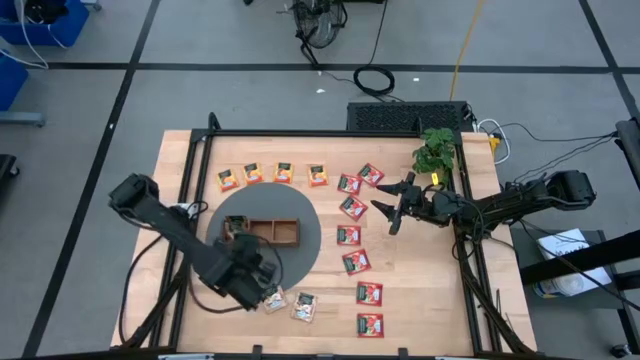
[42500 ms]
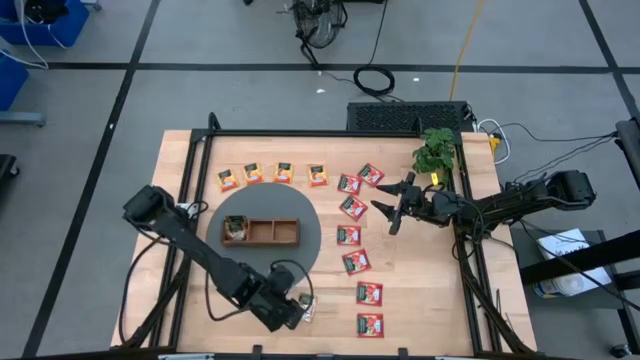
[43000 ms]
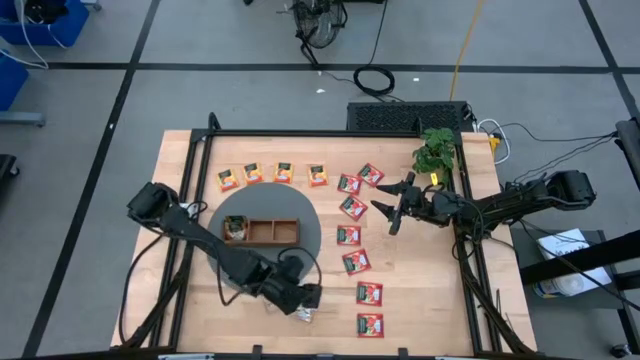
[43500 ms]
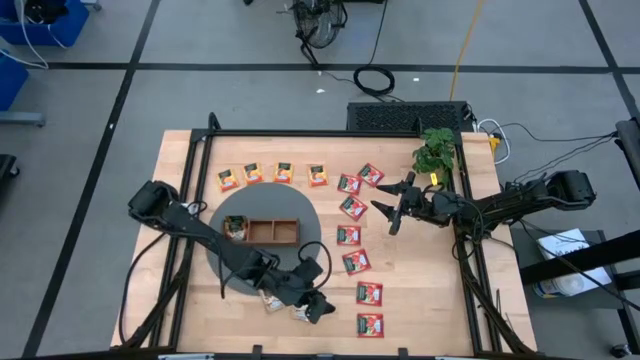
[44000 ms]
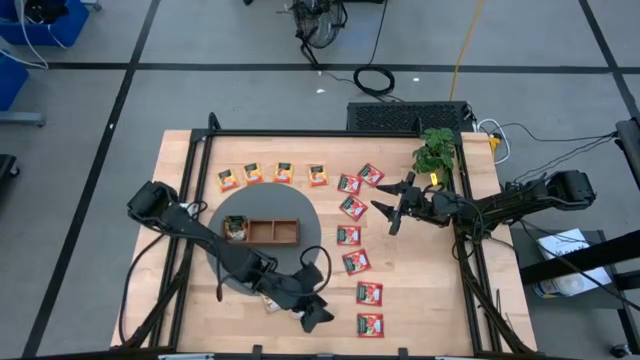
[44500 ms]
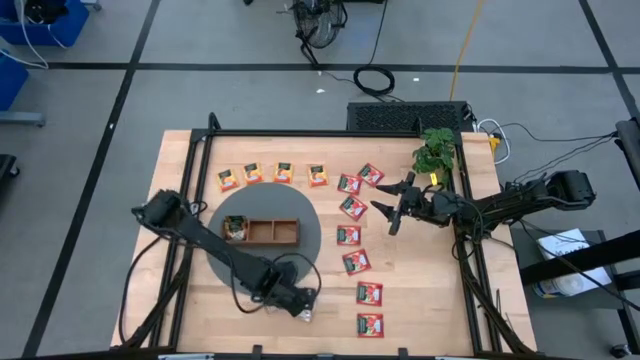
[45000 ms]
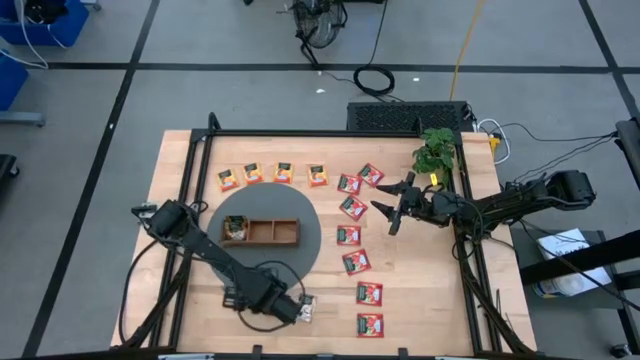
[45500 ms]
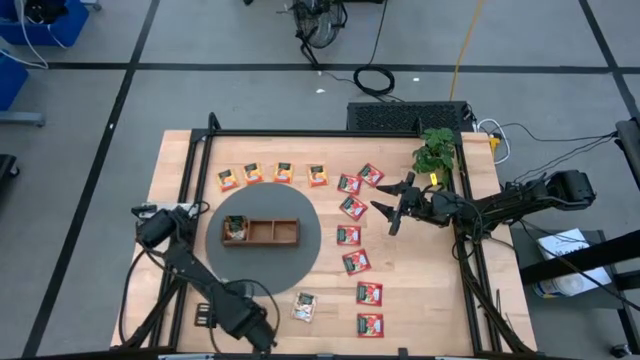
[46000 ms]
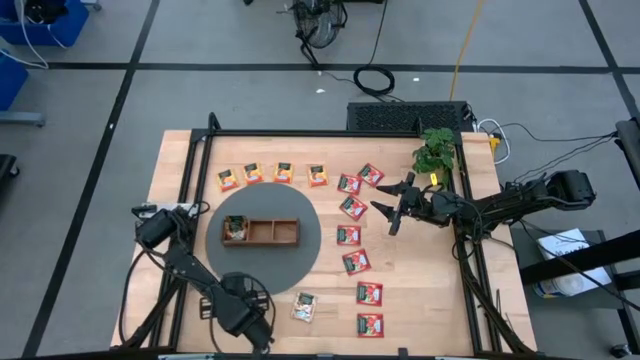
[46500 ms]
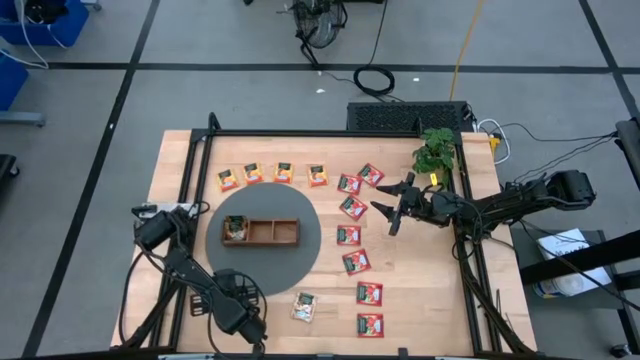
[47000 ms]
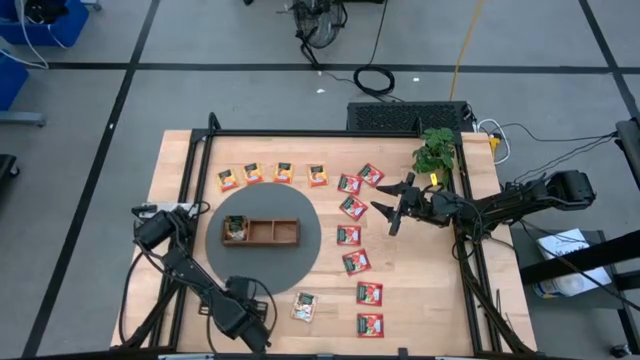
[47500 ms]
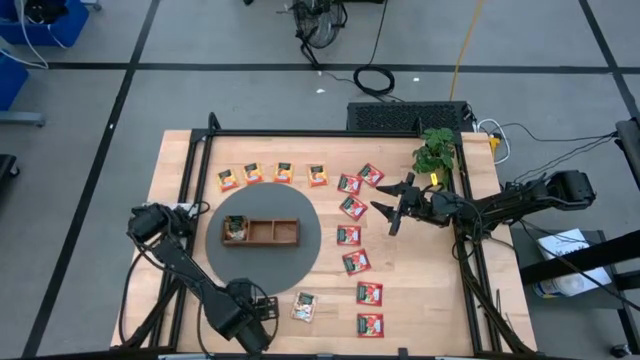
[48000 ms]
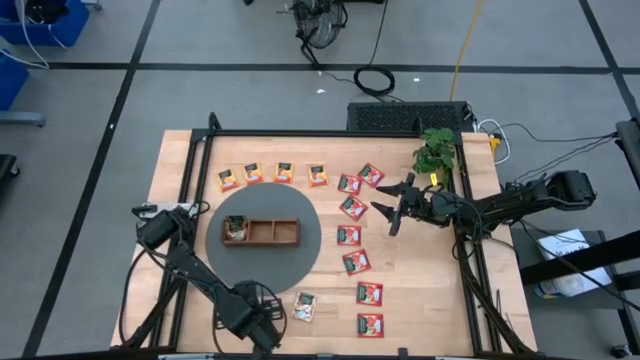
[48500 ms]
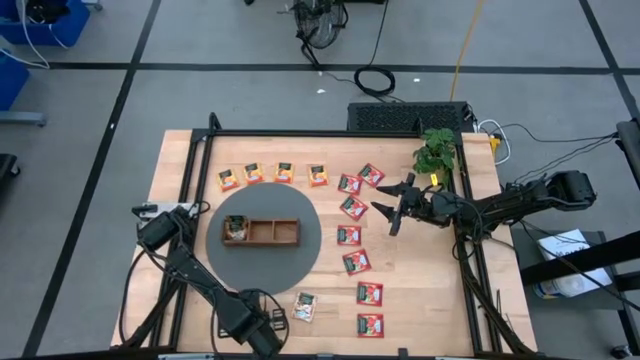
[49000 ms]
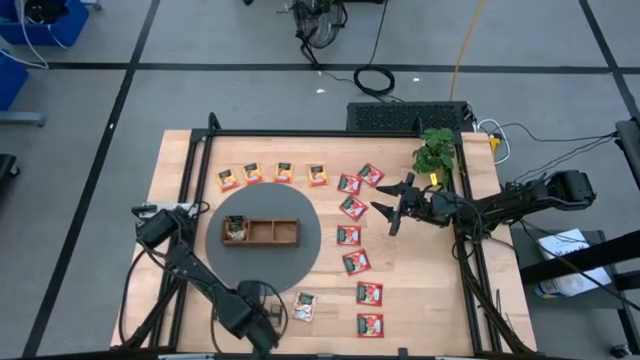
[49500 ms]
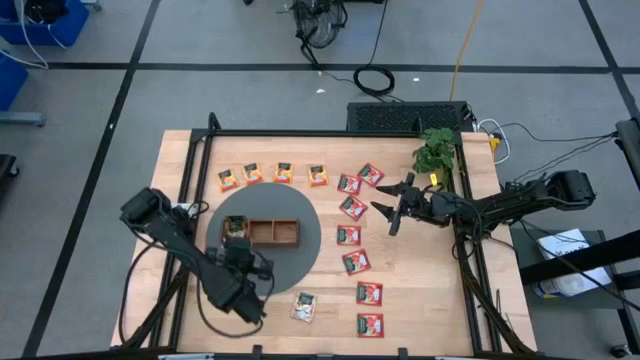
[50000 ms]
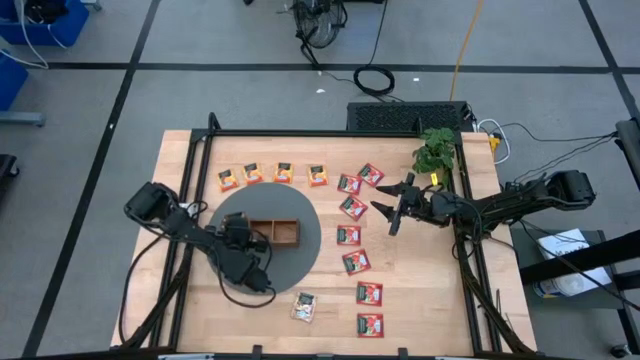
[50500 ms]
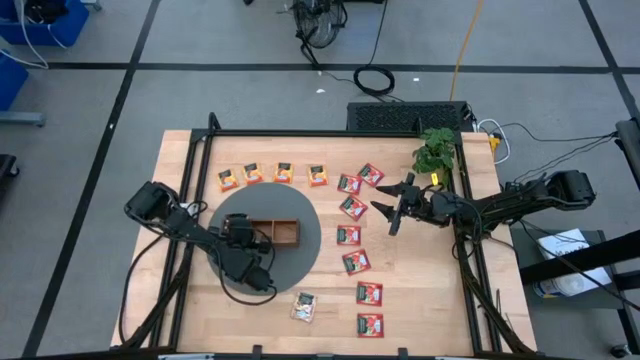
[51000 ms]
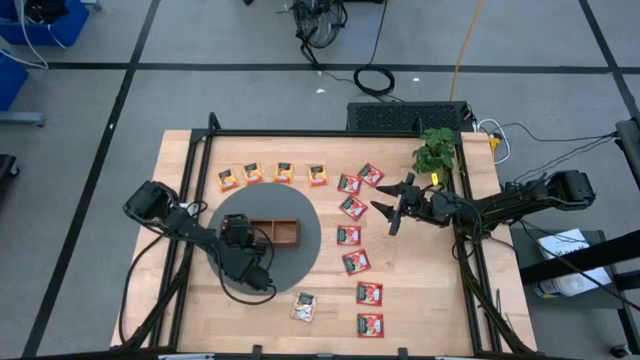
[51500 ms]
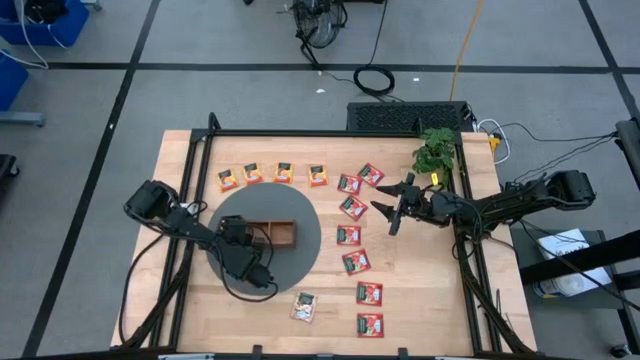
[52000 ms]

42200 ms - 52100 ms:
Task: Pick & Place Tea
Put the brown tea bag into the left section of the wooden organizer

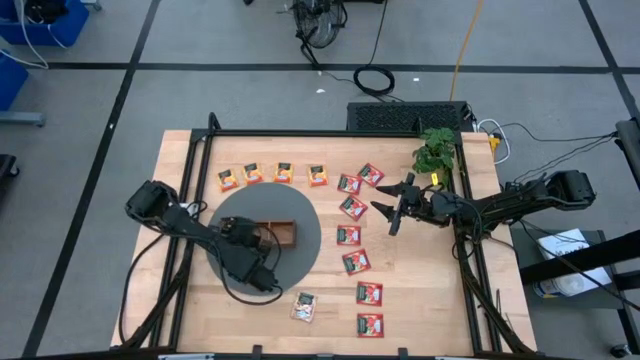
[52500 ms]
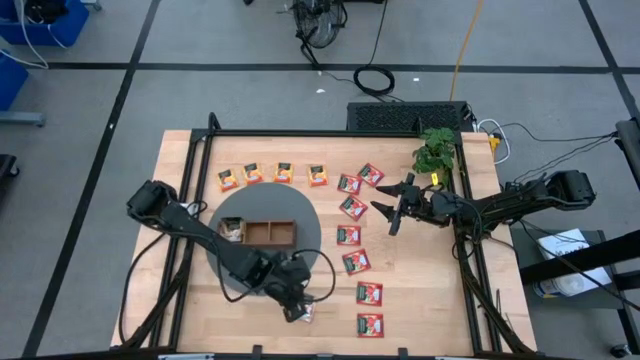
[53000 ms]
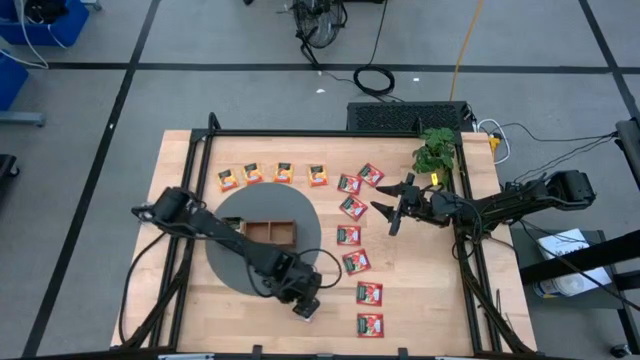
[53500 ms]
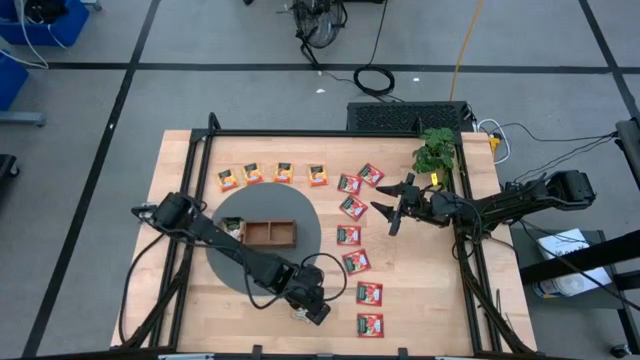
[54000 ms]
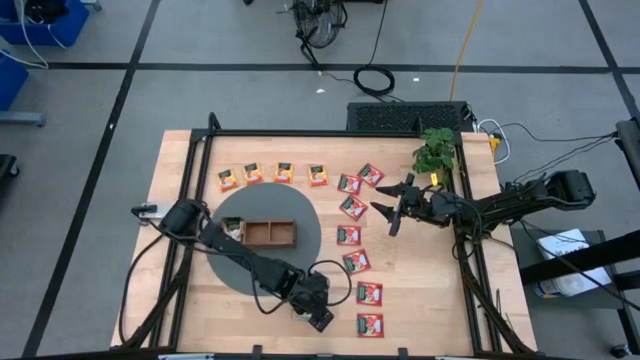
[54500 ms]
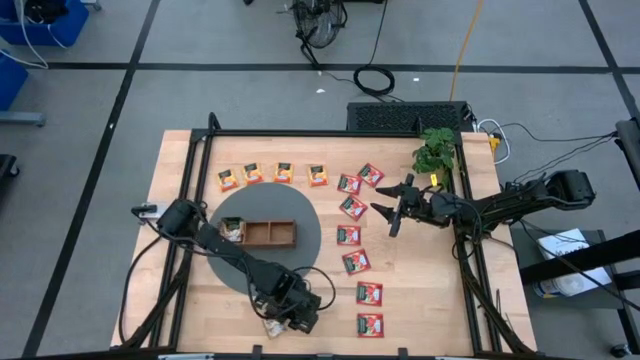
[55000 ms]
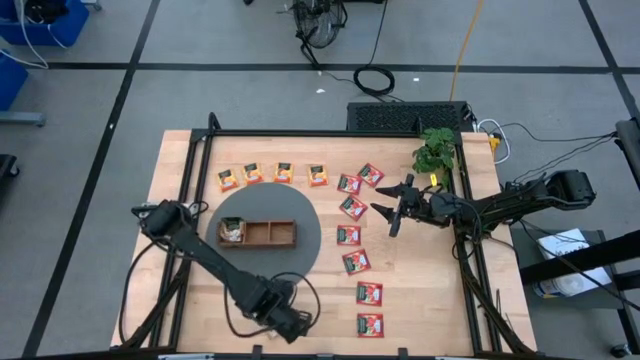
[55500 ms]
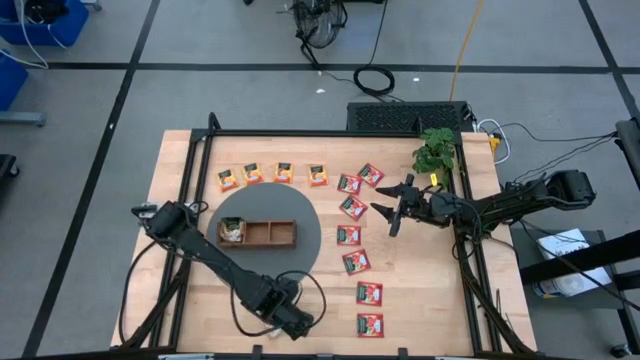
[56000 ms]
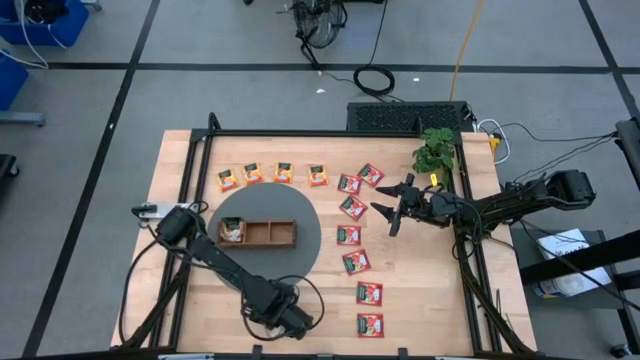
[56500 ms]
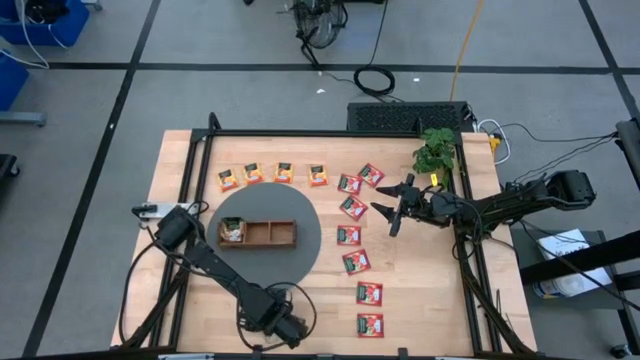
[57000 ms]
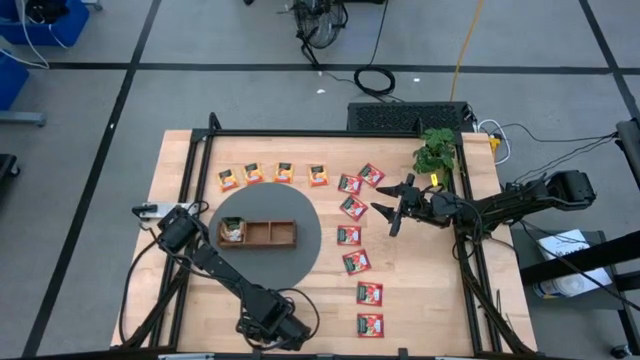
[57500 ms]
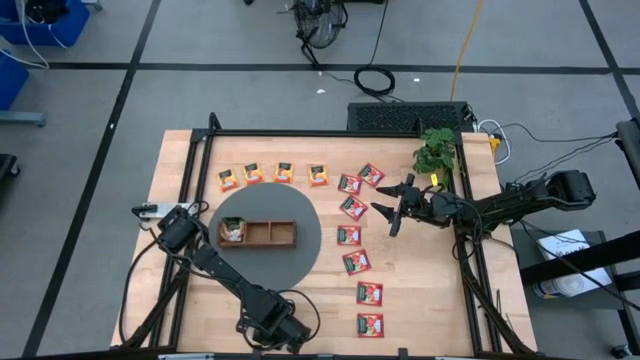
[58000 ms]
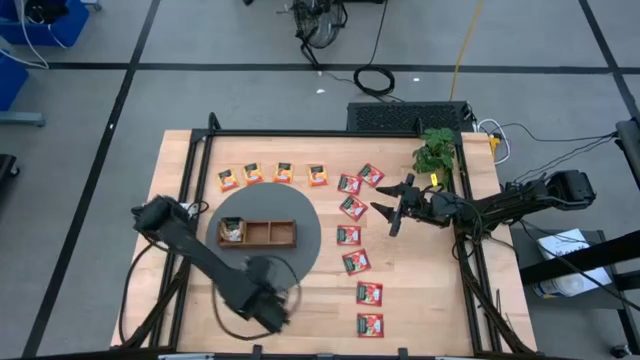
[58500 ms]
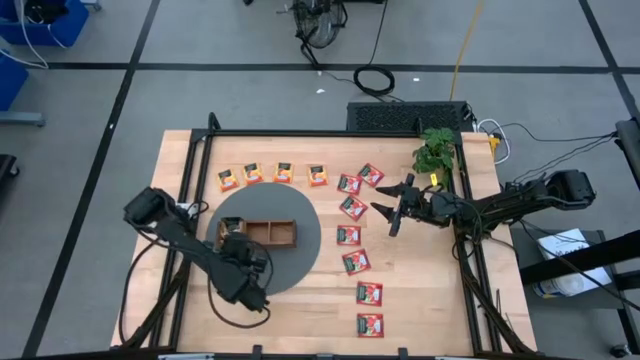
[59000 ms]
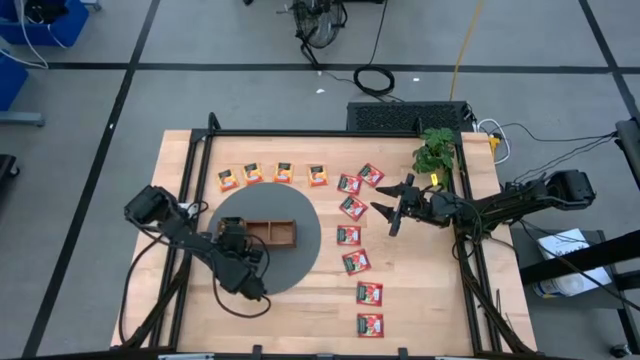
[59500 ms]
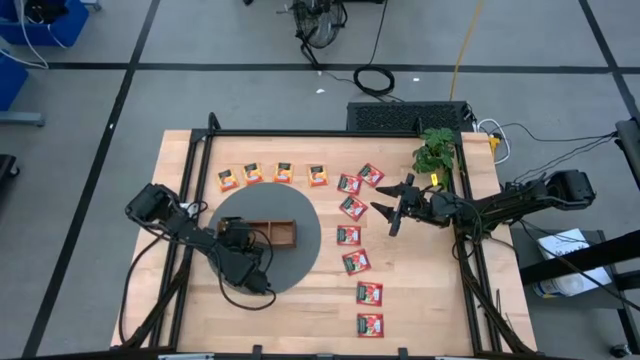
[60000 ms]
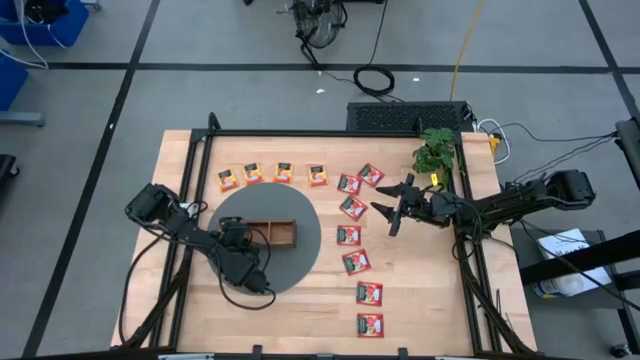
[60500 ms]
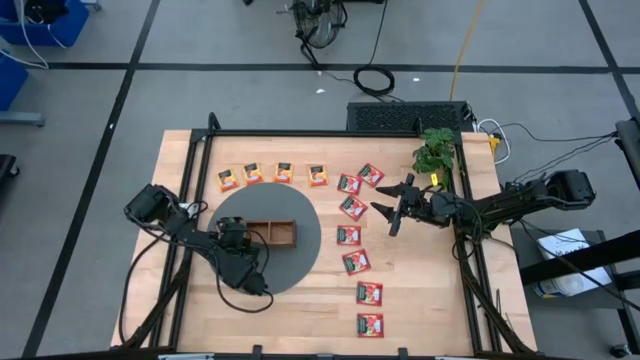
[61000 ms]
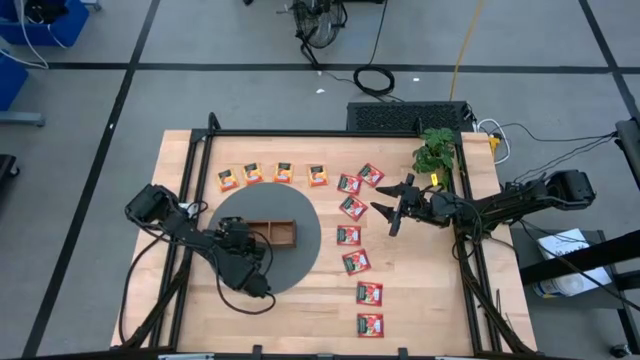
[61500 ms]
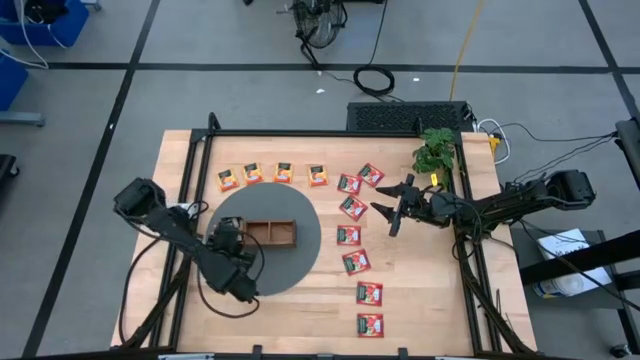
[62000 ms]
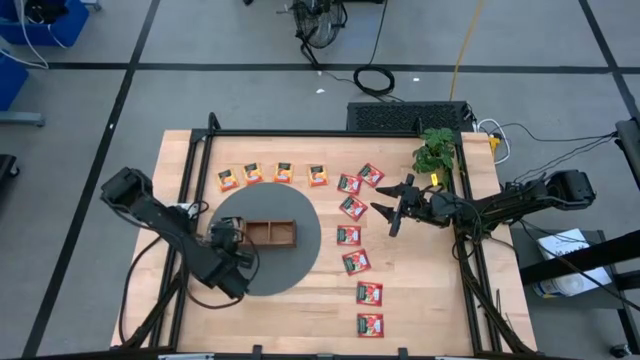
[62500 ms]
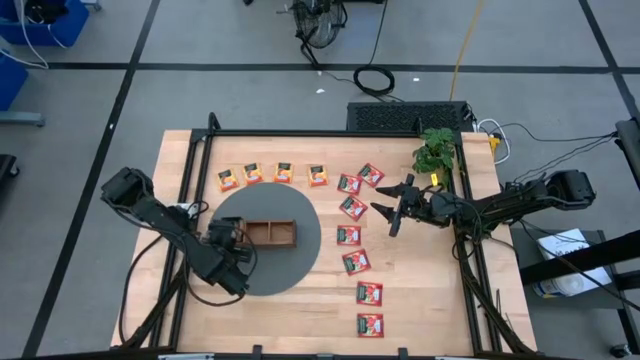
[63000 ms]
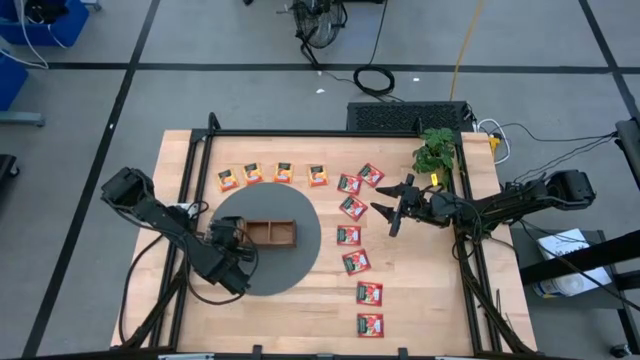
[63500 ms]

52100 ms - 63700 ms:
Put the brown tea bag into the left section of the wooden organizer
